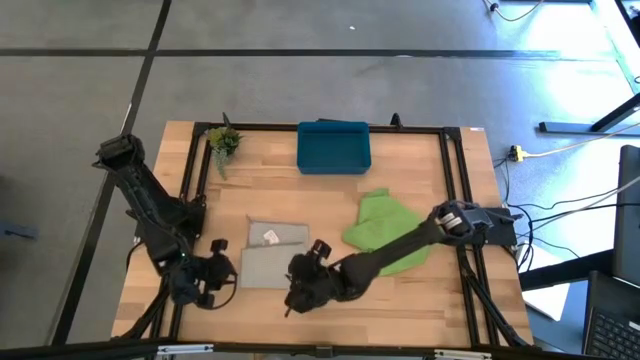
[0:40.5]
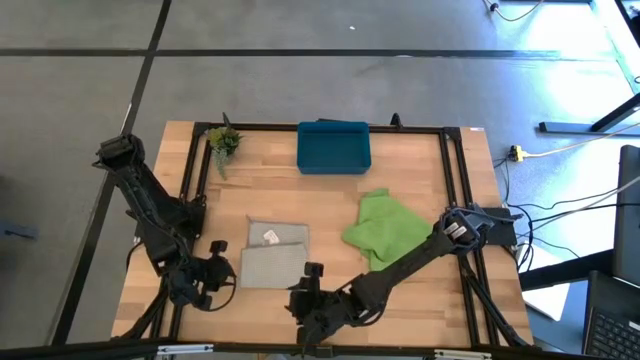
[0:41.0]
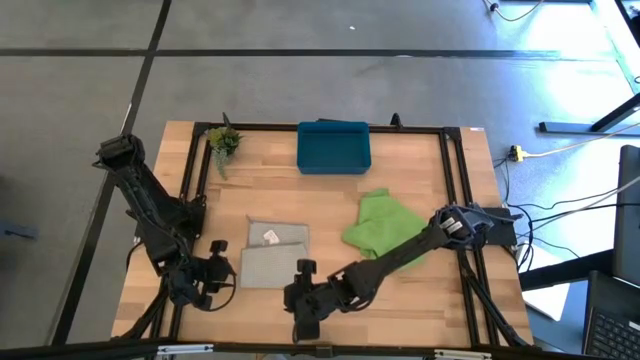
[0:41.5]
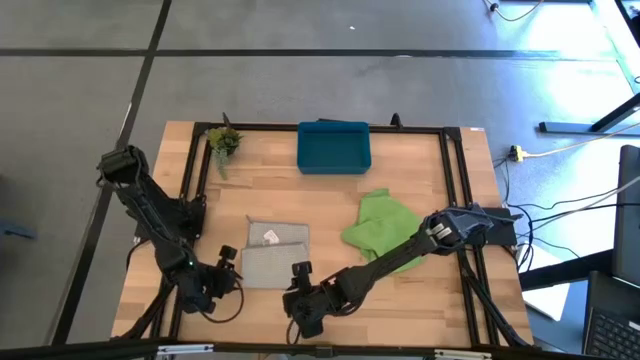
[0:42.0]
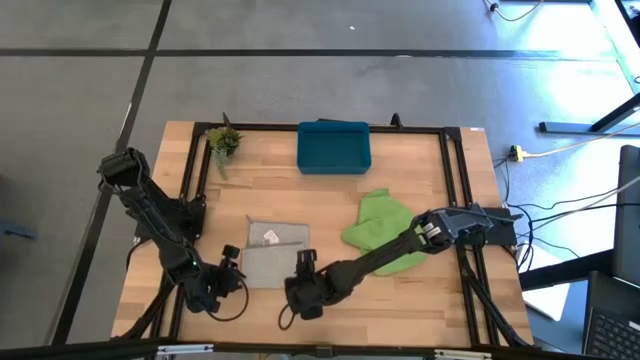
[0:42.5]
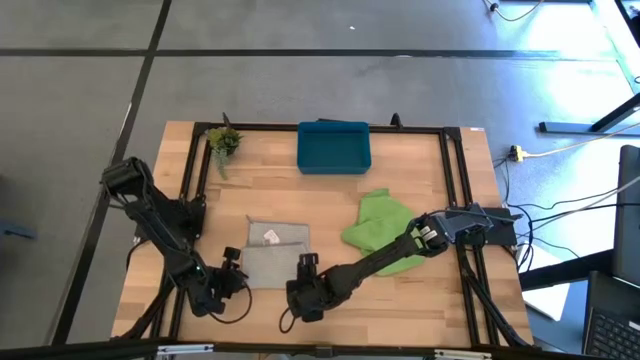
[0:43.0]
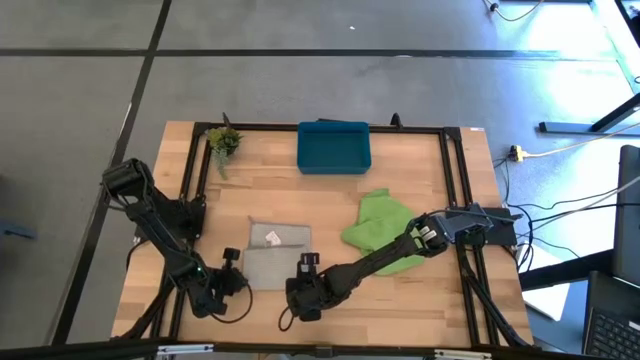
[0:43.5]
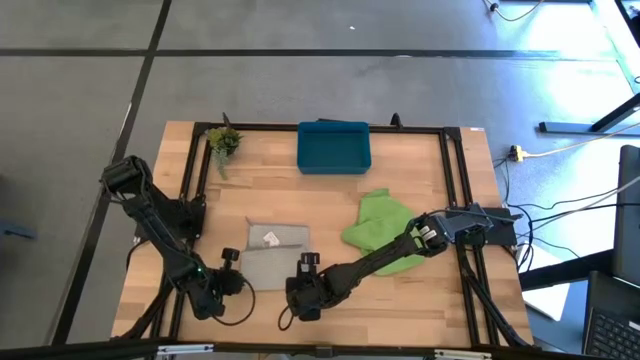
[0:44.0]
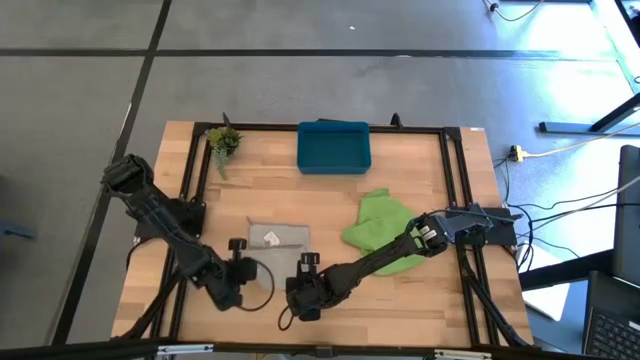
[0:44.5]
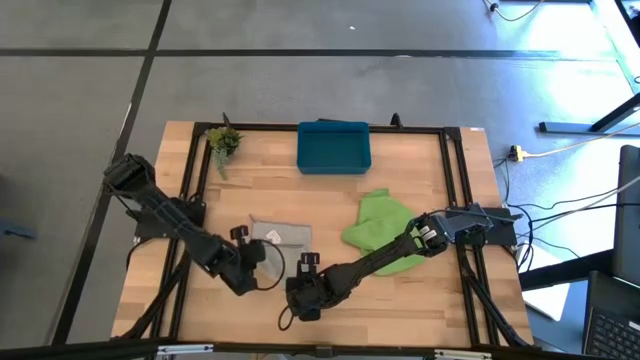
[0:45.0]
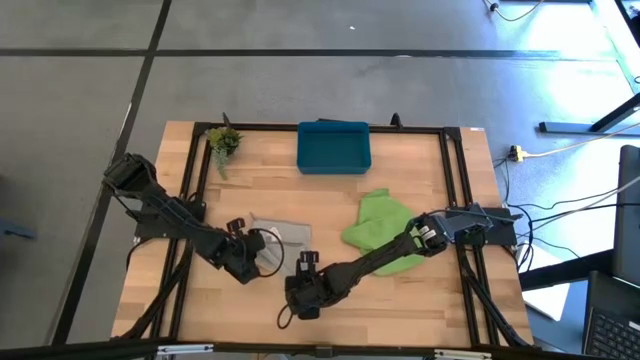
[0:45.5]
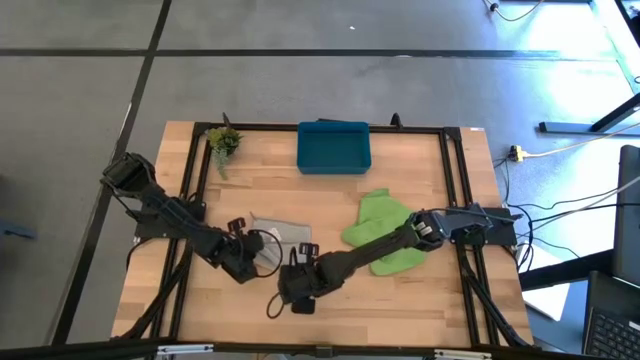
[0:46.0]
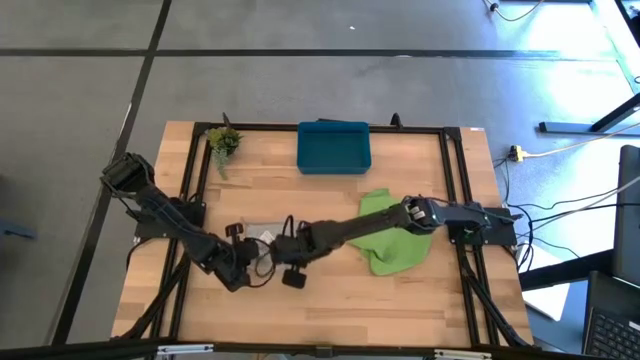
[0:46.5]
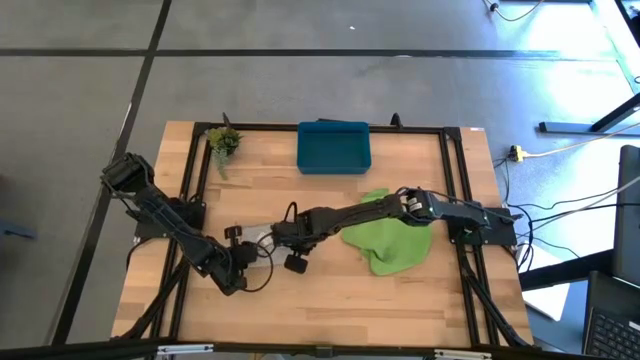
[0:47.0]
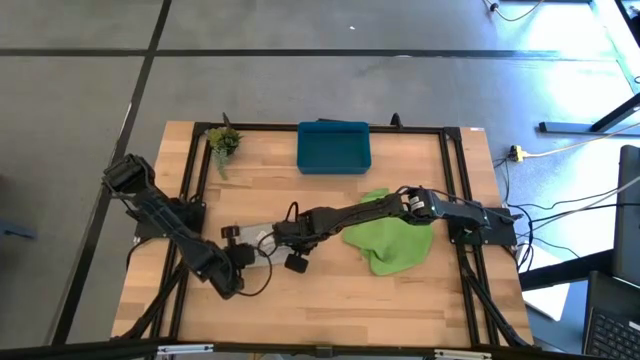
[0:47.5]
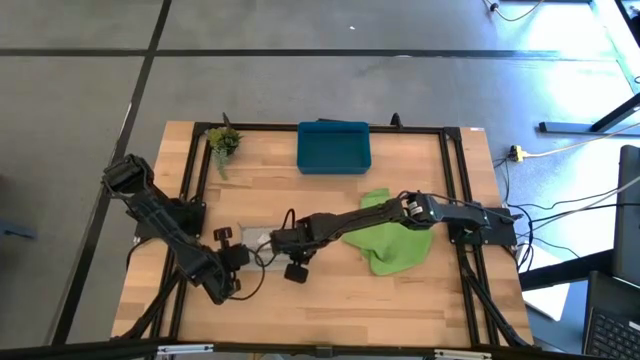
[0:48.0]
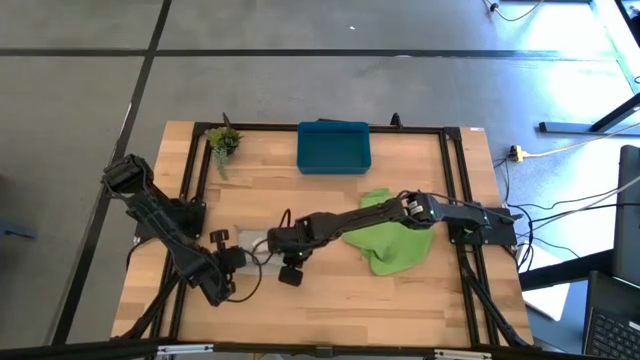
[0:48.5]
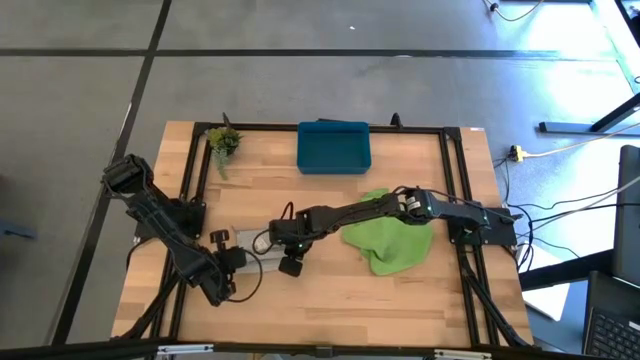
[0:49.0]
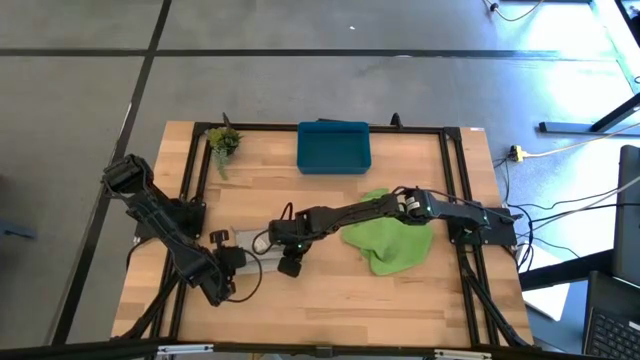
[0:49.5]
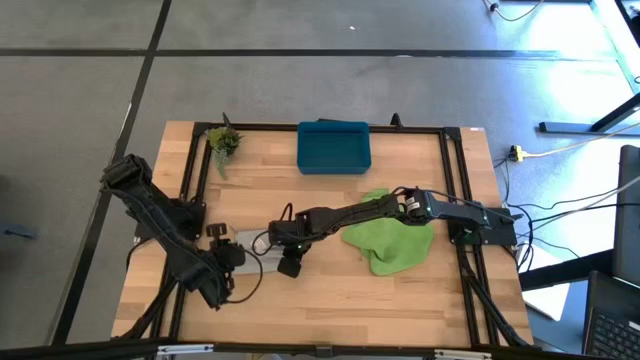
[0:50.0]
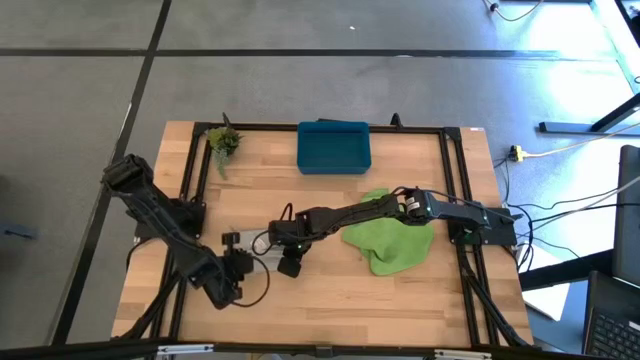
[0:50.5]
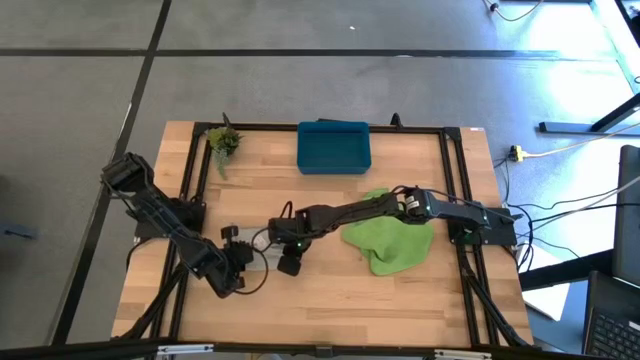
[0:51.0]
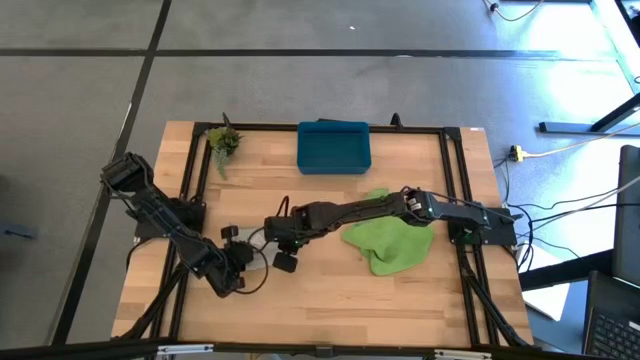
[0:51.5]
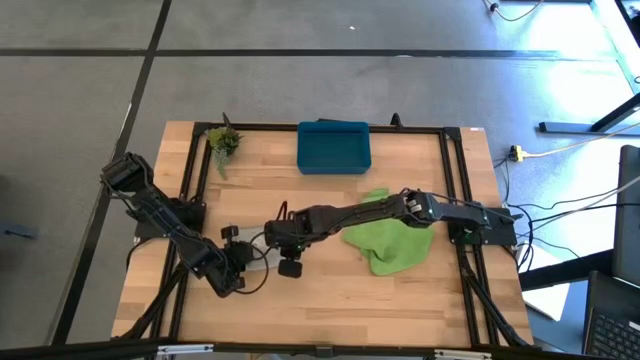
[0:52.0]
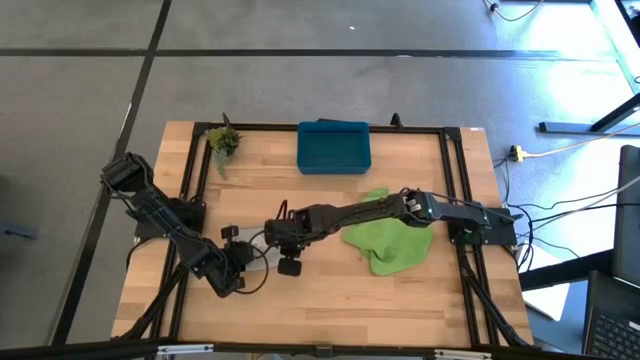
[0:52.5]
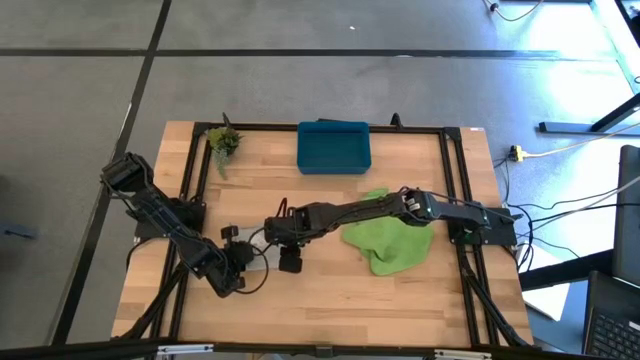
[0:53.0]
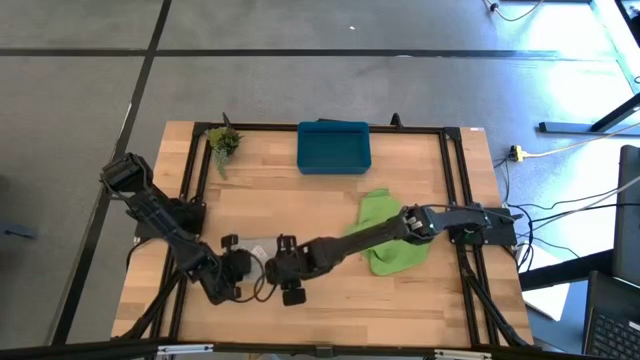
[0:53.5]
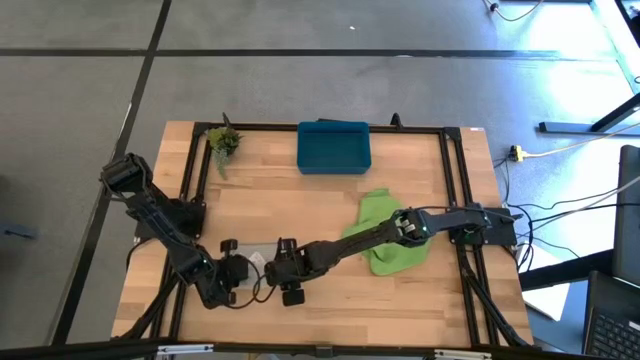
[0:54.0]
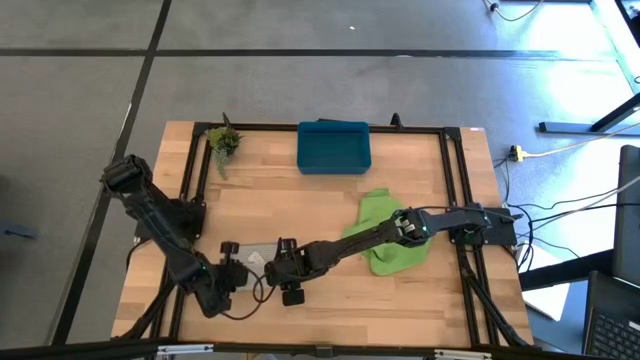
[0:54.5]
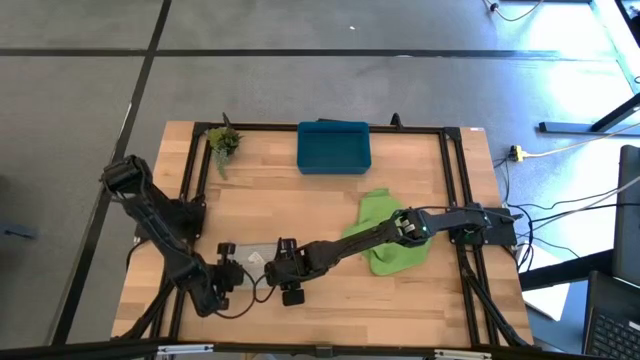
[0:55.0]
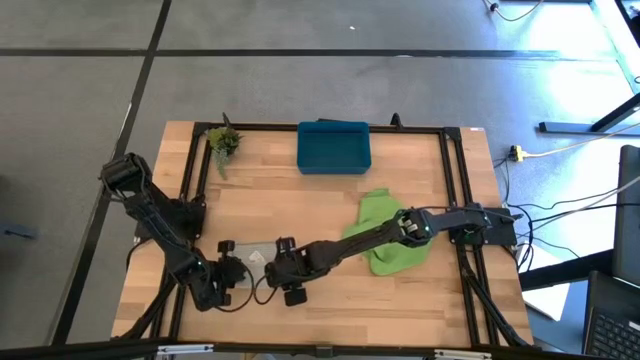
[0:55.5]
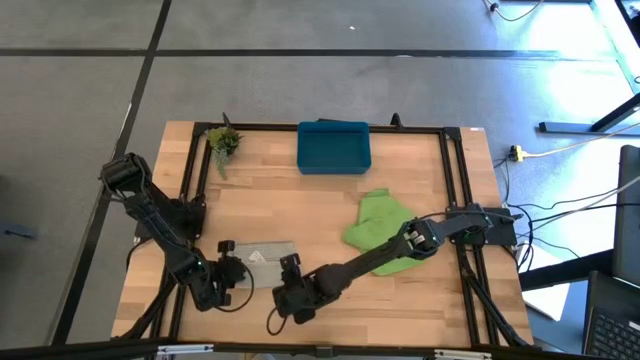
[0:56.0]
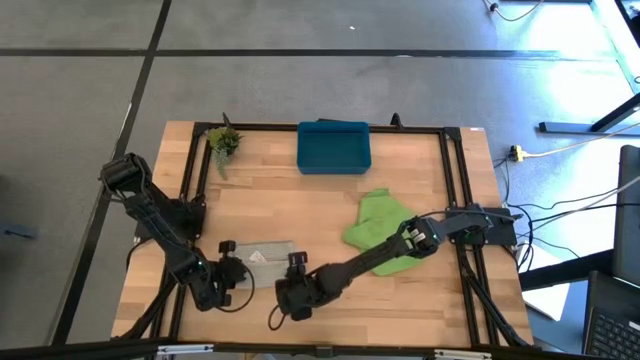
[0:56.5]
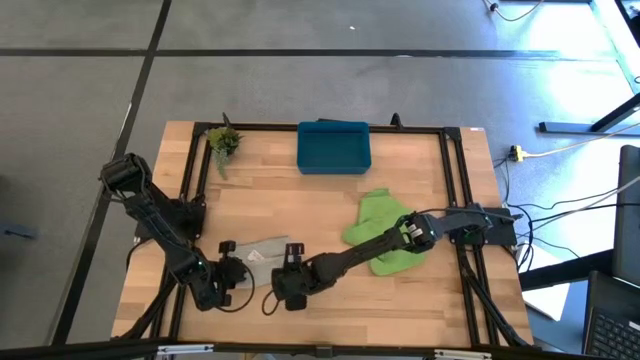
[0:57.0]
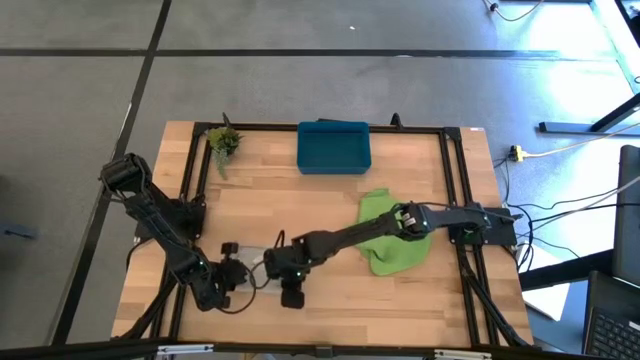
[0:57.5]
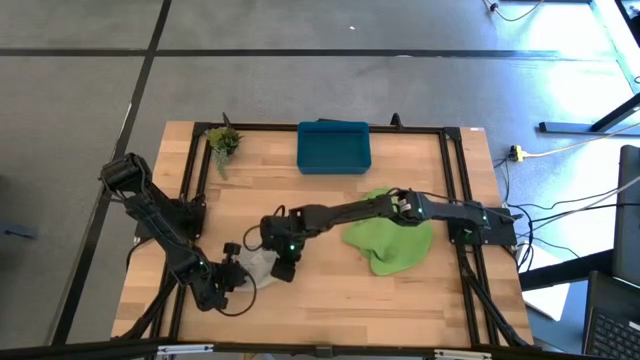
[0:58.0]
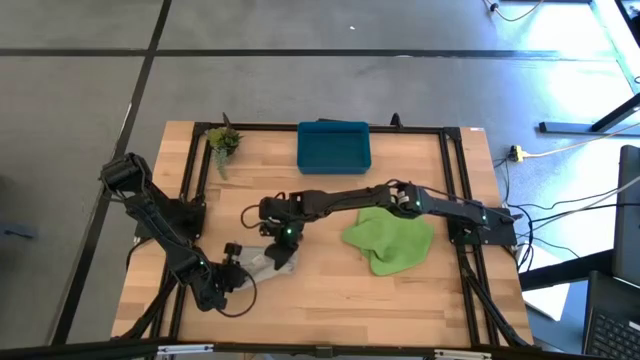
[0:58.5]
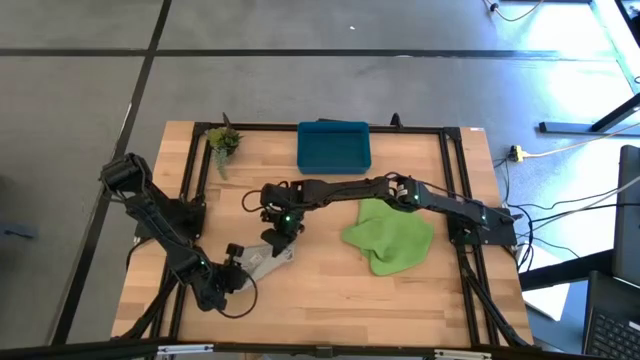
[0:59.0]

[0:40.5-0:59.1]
Task: Roll microfiber towels into tight, uniform cylinder then place into a basket
Roll the gray microfiber cloth

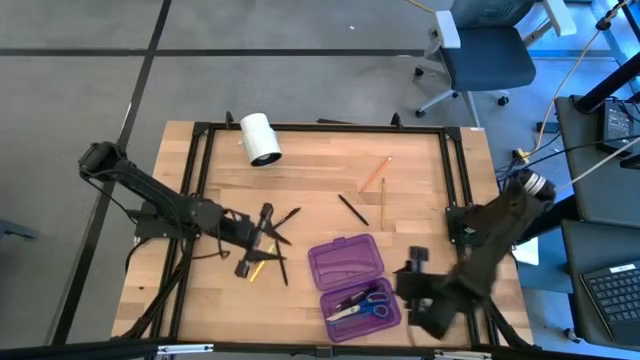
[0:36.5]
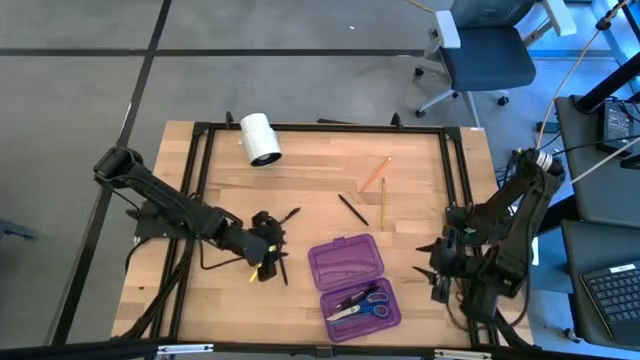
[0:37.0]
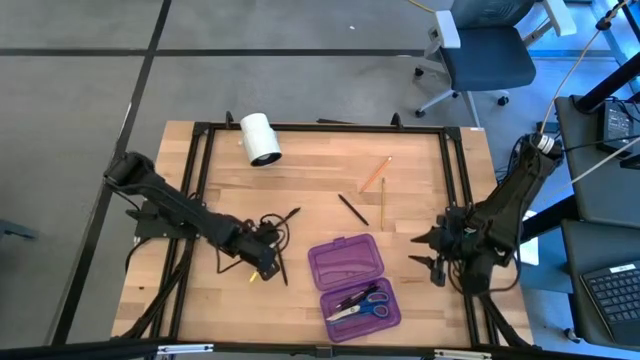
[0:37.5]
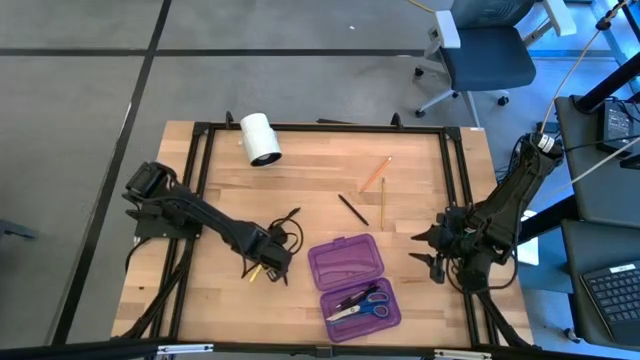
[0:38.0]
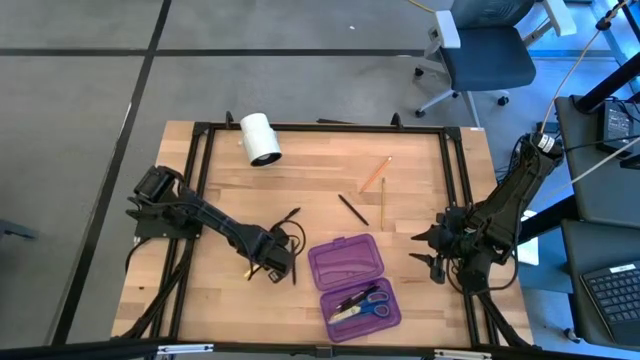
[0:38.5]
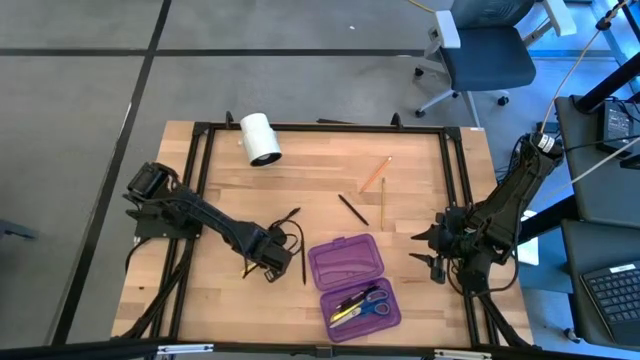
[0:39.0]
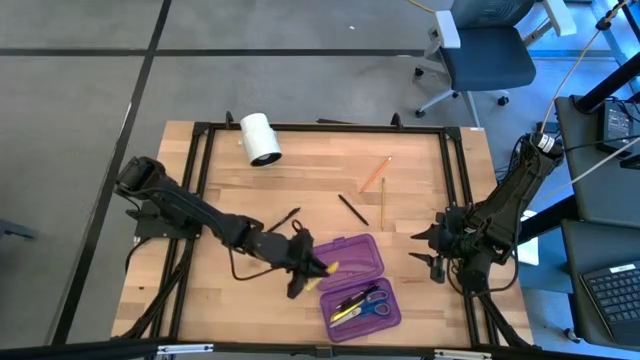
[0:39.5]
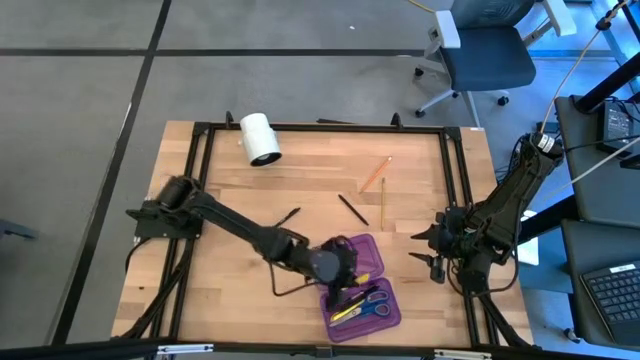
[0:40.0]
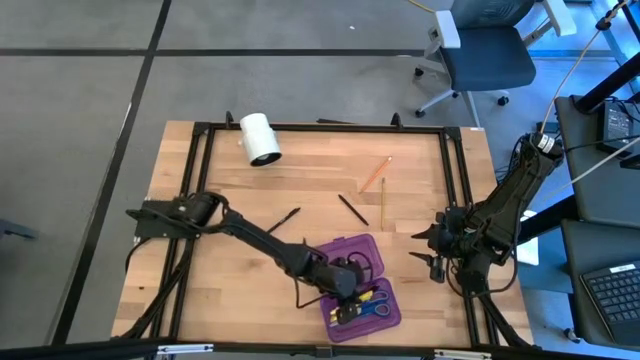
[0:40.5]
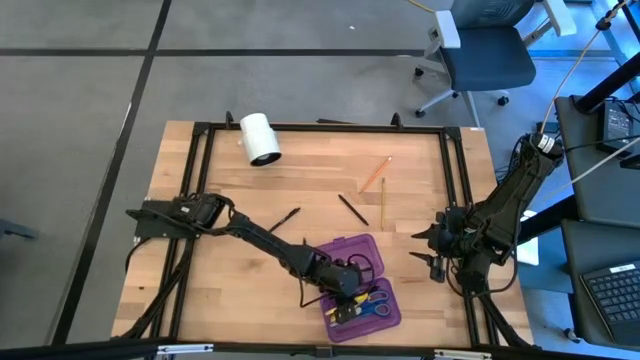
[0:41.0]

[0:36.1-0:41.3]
Task: Pick & place school supplies into a supply box
Put the yellow pen into the purple supply box
